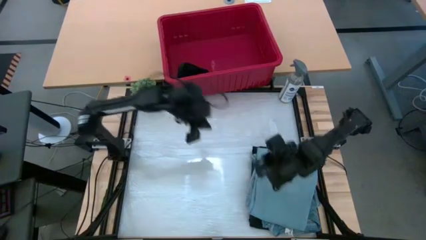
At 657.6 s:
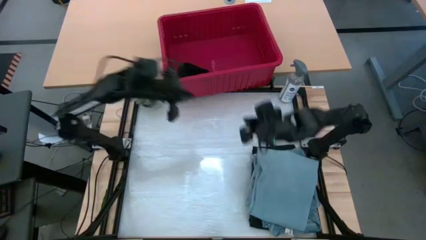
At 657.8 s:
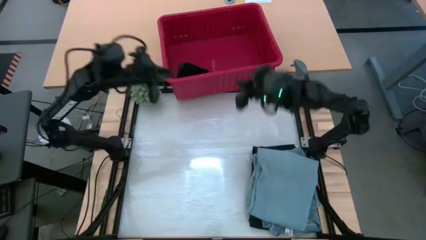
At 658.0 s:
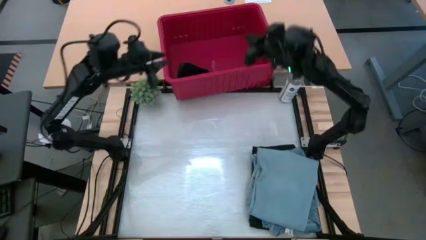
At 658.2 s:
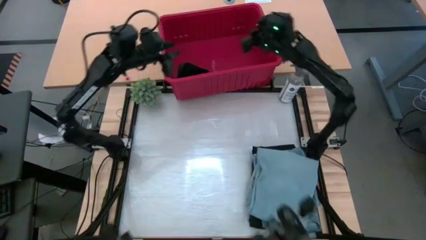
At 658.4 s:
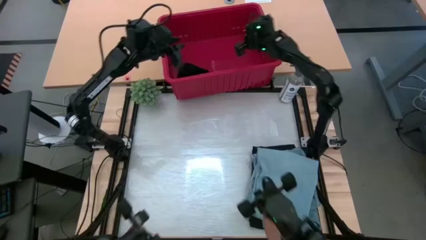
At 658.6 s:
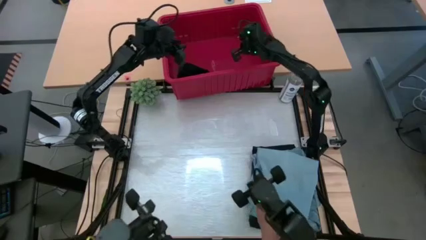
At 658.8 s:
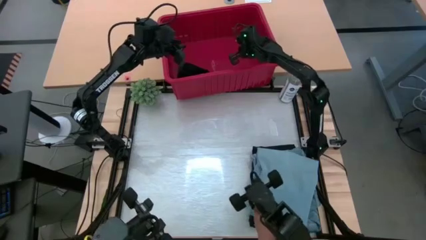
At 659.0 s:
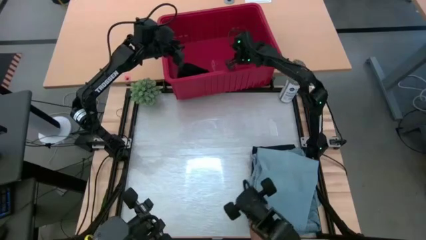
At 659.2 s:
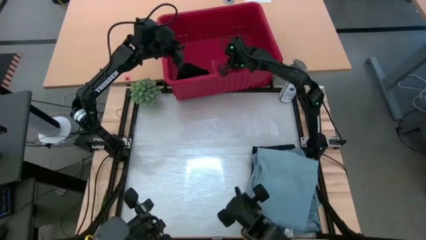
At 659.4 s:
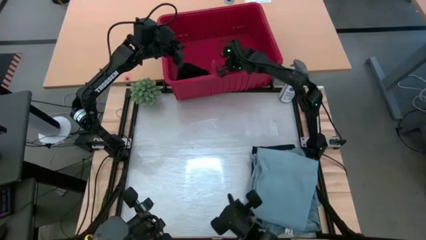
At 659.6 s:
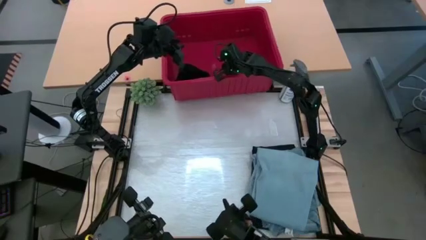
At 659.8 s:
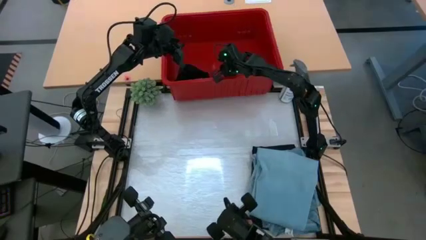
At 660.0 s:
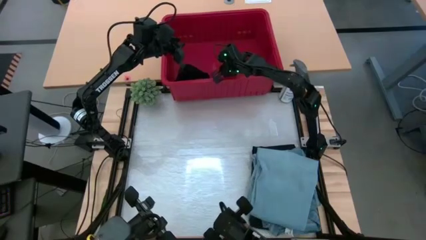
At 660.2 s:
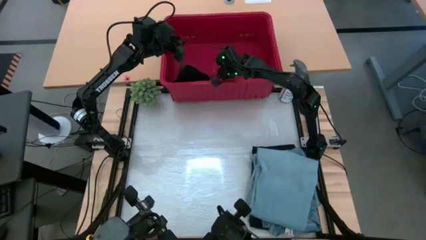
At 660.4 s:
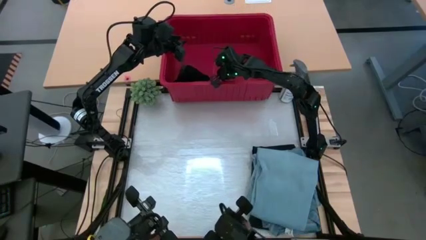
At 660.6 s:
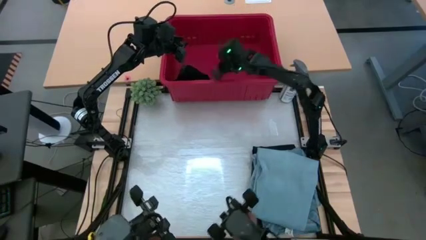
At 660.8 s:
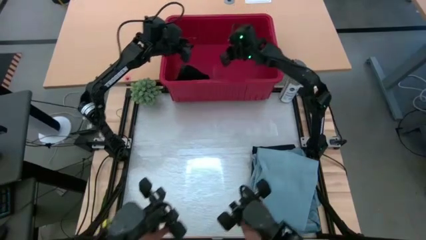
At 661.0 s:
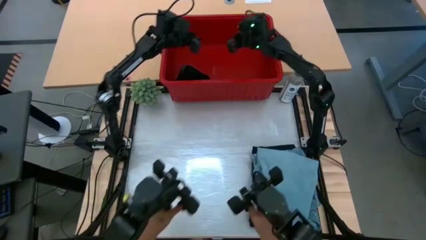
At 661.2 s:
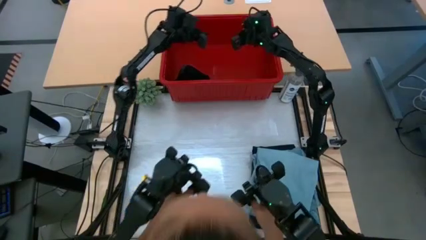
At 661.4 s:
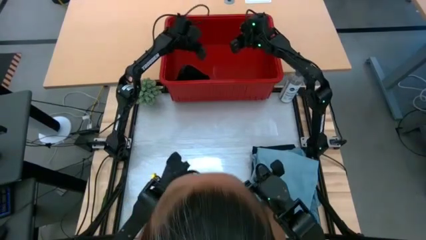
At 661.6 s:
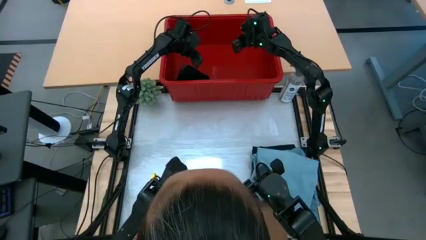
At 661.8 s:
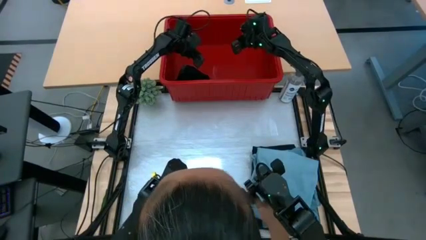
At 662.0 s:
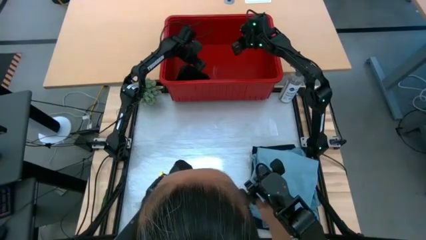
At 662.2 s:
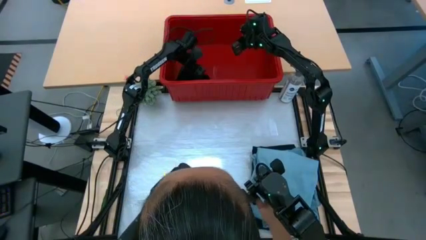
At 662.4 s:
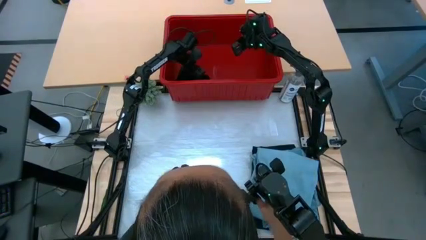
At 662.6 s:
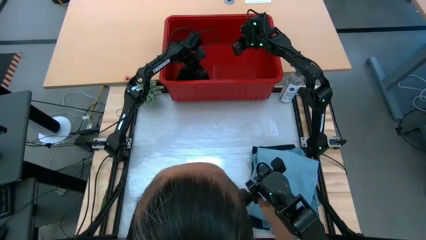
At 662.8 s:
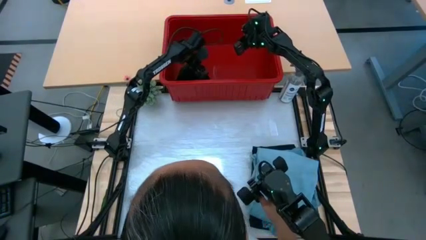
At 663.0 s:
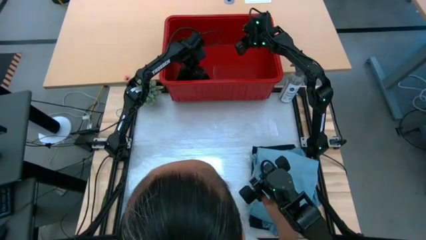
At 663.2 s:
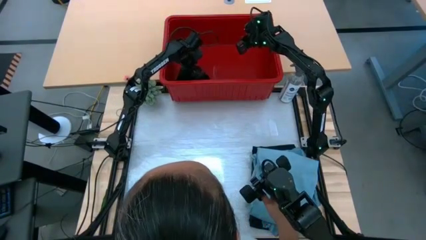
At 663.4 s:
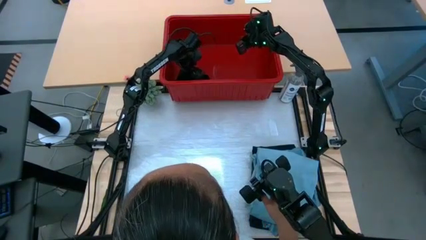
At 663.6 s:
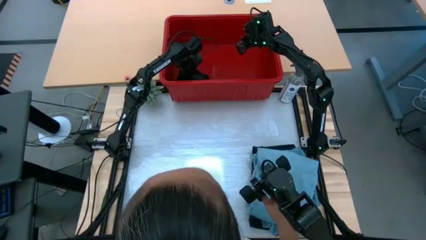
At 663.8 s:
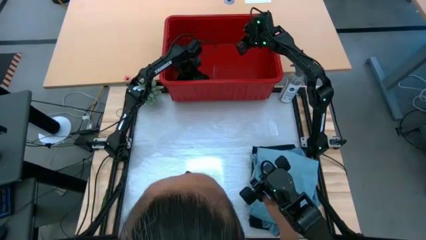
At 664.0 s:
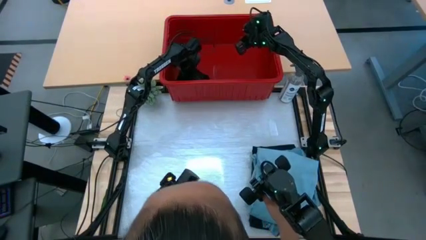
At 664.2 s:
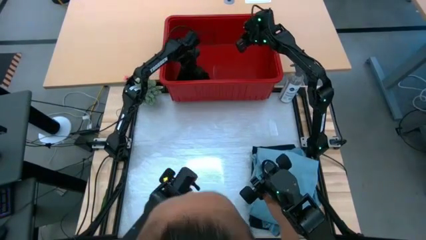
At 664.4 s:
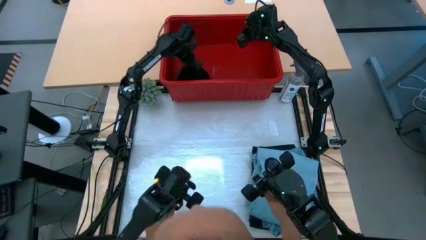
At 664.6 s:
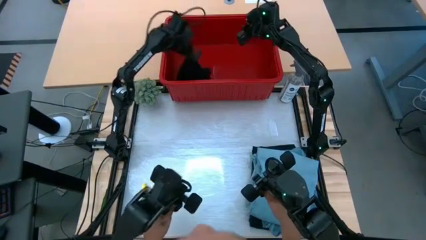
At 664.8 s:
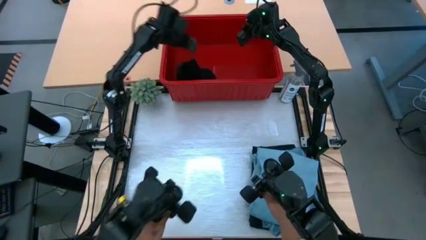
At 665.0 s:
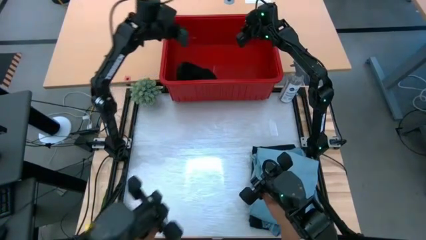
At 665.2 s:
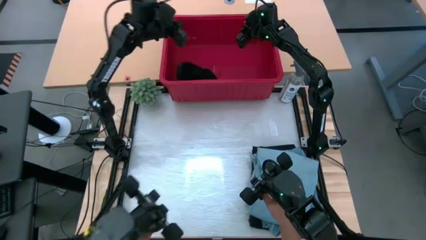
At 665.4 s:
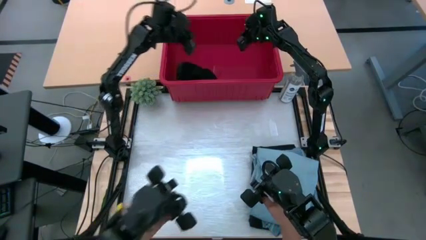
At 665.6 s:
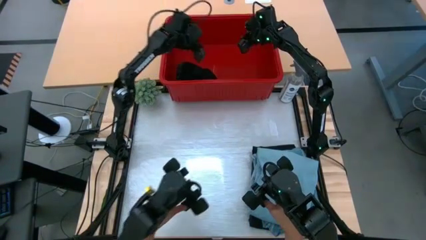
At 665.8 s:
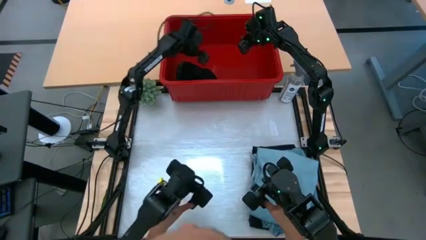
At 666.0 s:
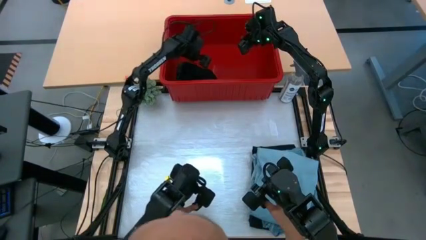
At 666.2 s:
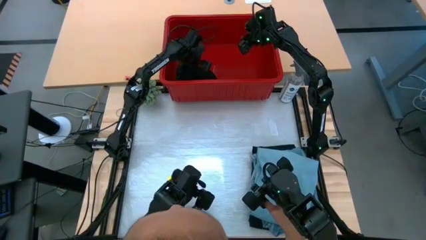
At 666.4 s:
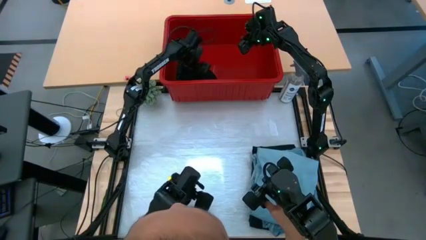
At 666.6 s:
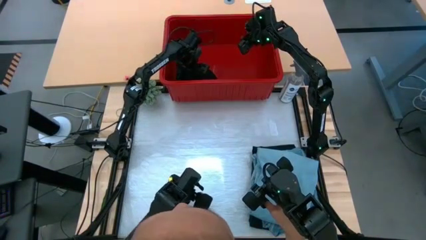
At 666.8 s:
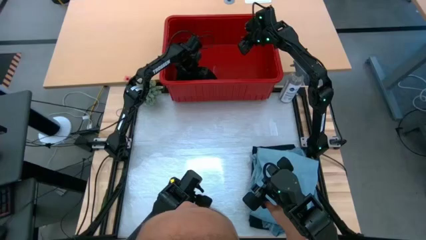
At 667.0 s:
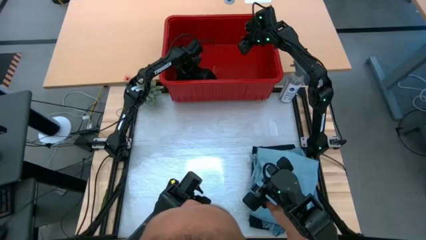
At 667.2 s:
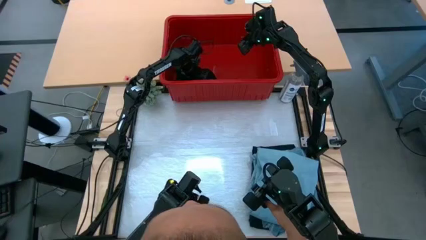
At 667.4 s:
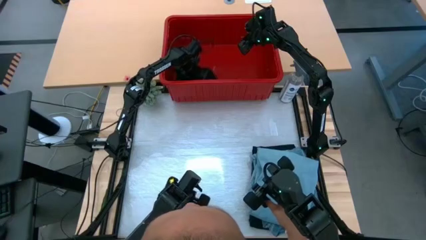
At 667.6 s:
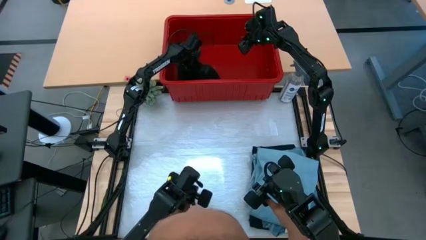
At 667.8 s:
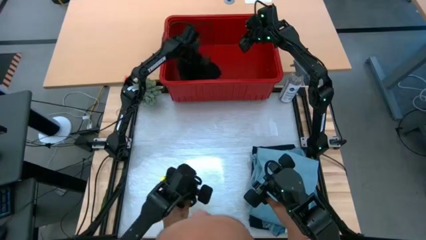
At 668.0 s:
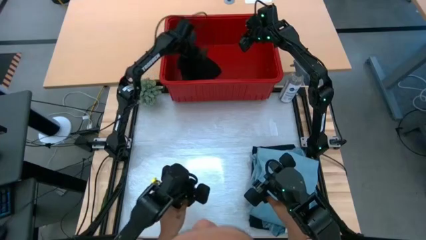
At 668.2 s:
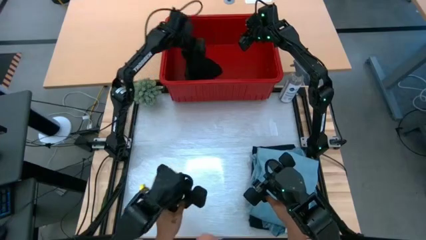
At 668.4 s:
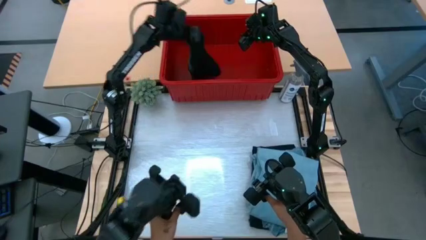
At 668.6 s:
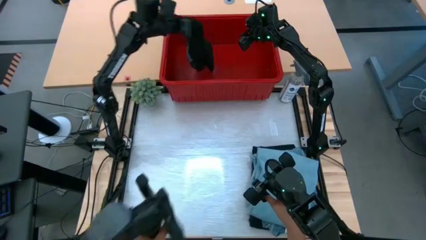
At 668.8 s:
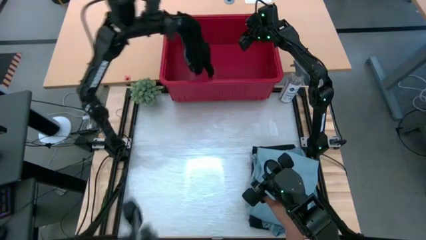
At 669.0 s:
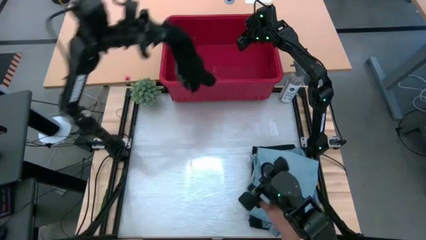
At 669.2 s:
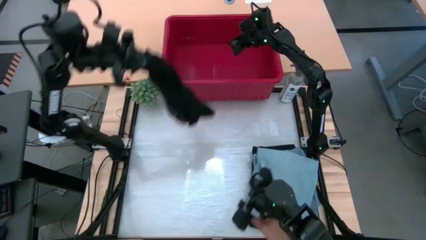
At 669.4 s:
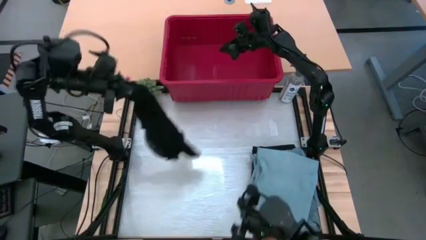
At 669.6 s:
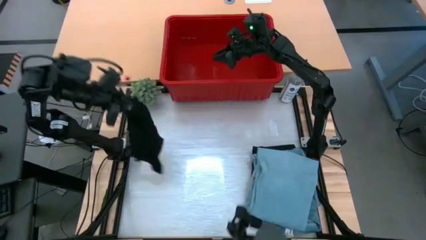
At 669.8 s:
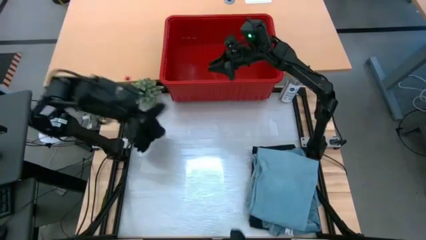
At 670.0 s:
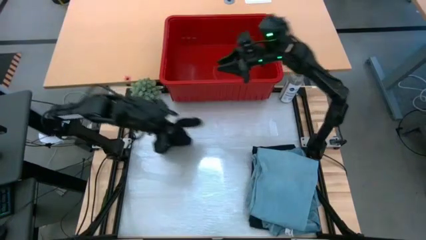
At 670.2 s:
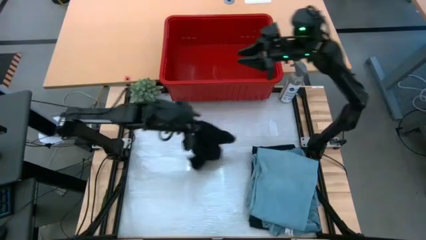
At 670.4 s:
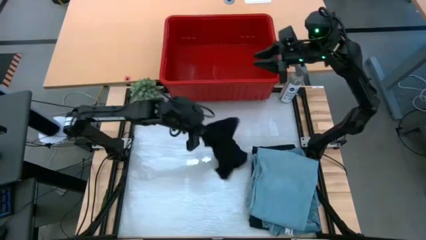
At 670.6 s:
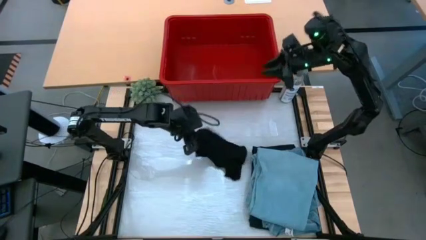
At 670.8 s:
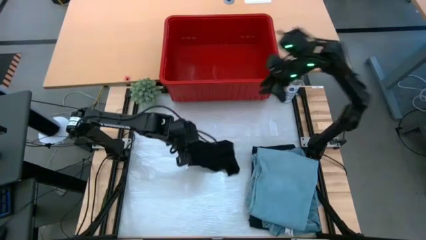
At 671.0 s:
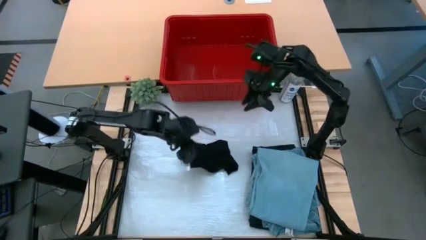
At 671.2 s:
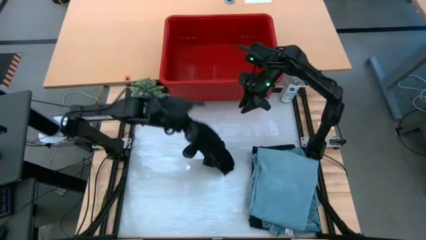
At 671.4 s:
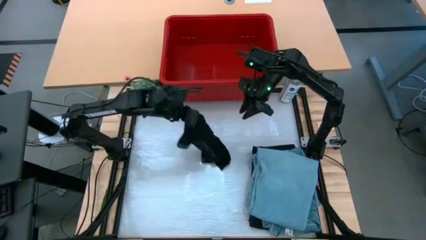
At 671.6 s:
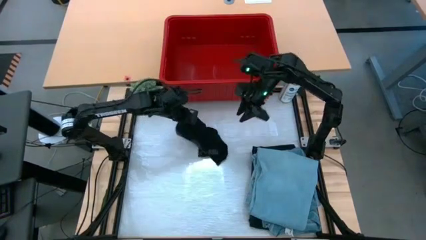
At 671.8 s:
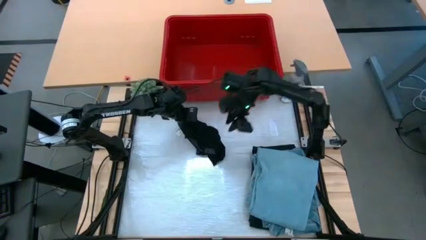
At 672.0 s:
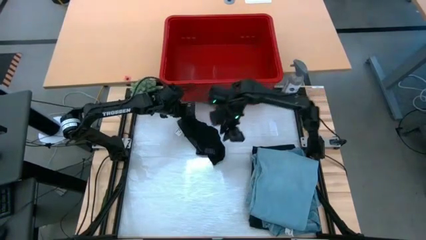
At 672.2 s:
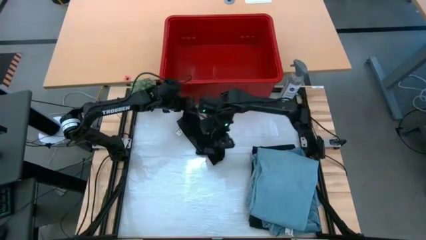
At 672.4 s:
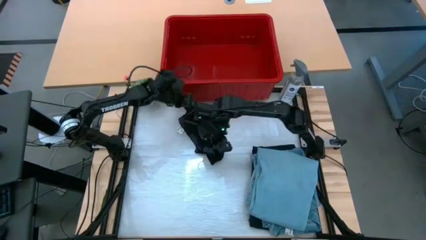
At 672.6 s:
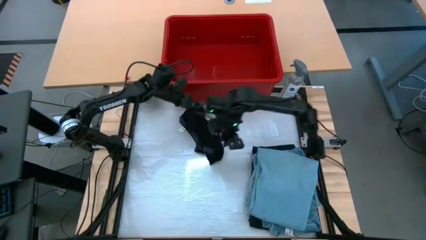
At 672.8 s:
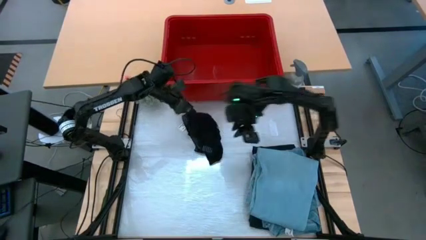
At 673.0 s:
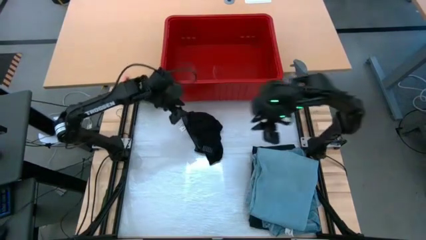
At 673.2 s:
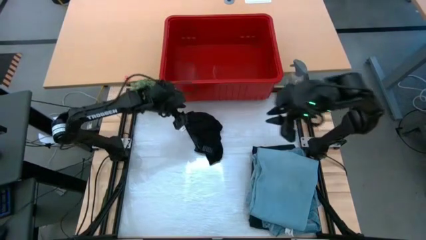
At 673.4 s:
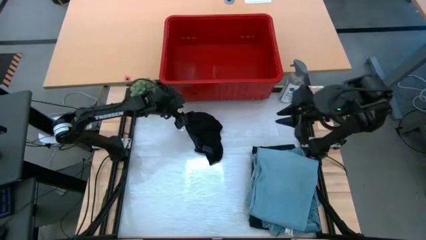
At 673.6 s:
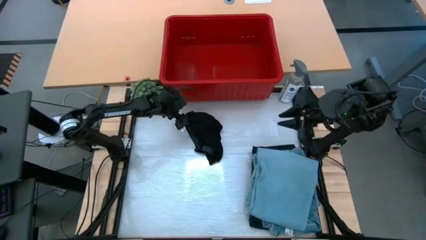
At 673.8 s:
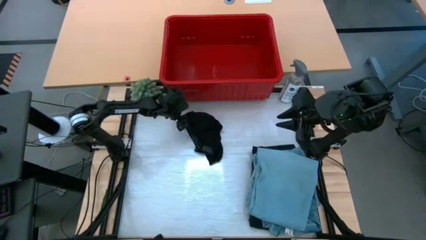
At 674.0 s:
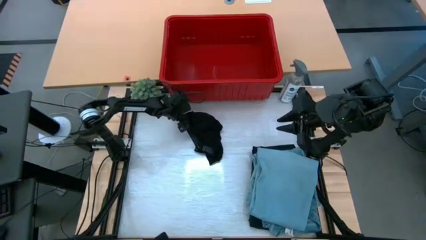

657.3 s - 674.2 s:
Task: Fold Laundry from Bin
Fold the black boxer
